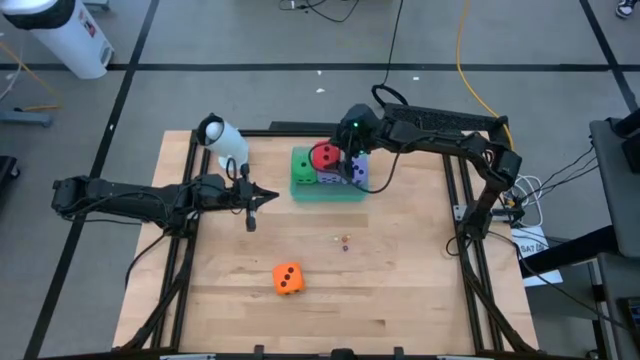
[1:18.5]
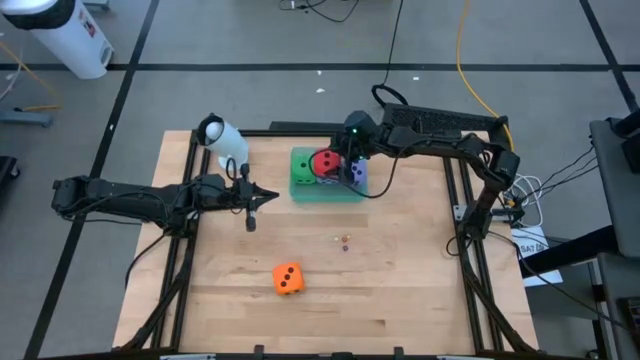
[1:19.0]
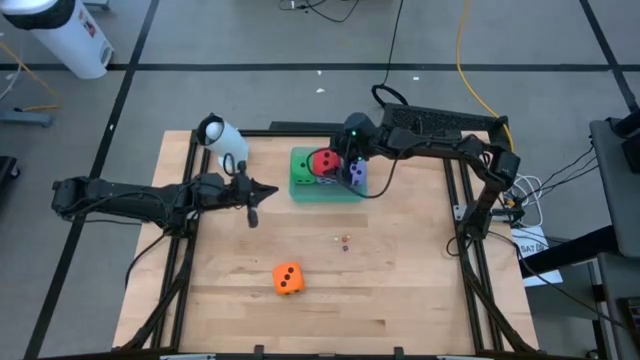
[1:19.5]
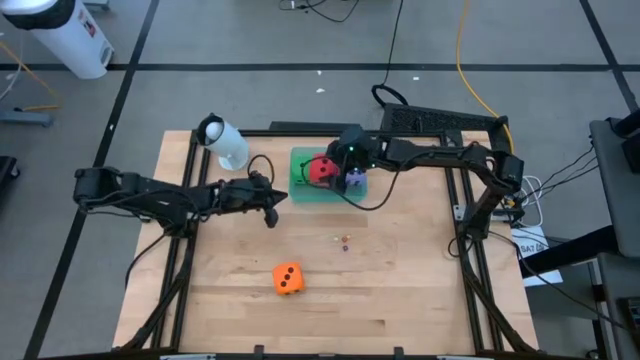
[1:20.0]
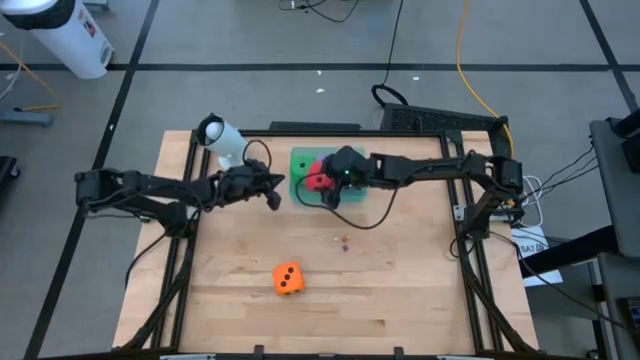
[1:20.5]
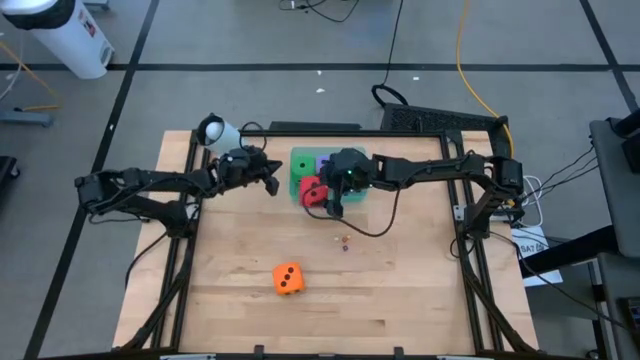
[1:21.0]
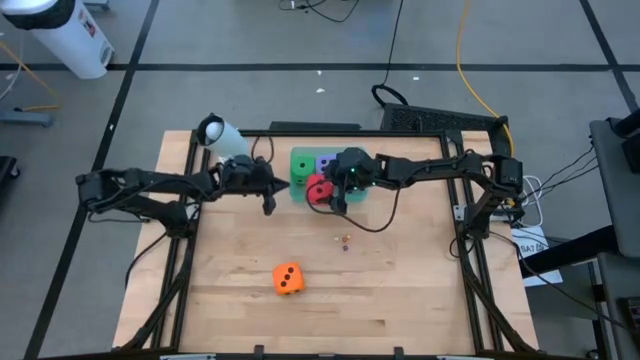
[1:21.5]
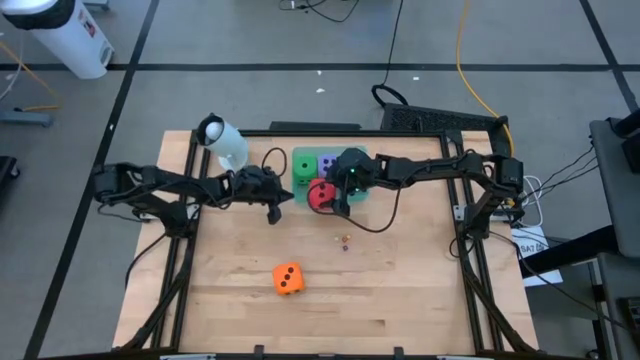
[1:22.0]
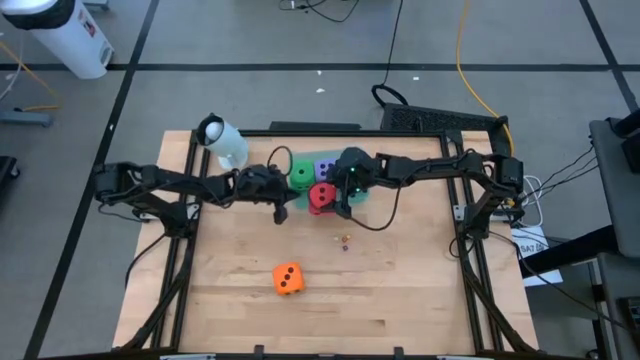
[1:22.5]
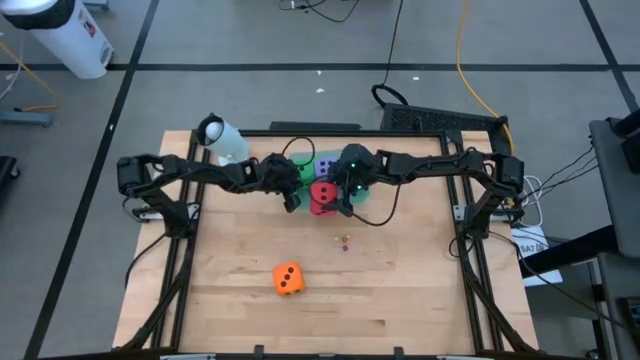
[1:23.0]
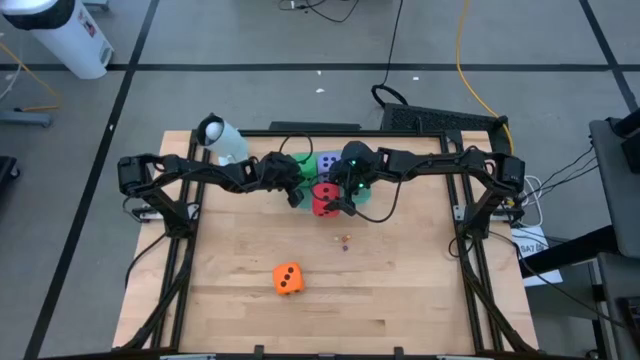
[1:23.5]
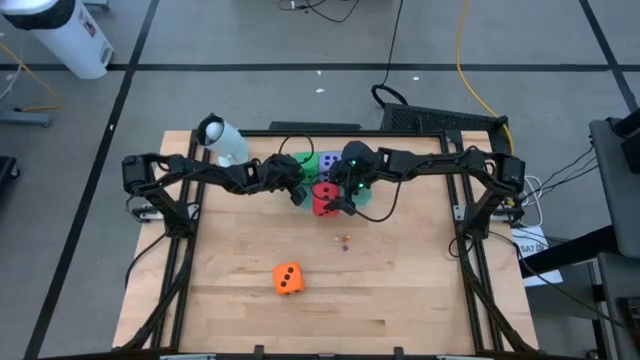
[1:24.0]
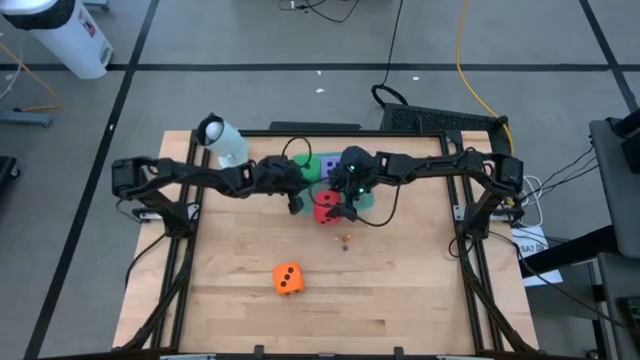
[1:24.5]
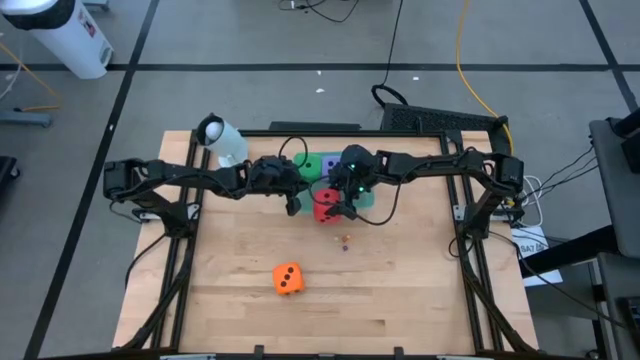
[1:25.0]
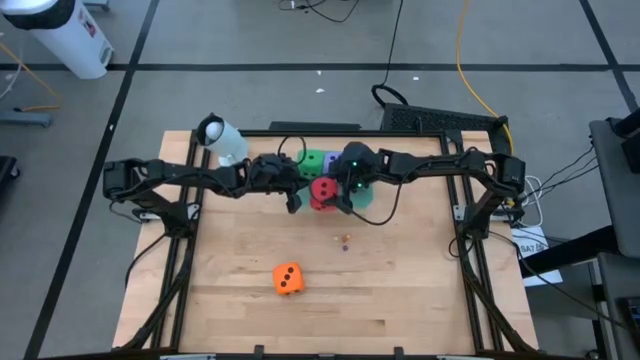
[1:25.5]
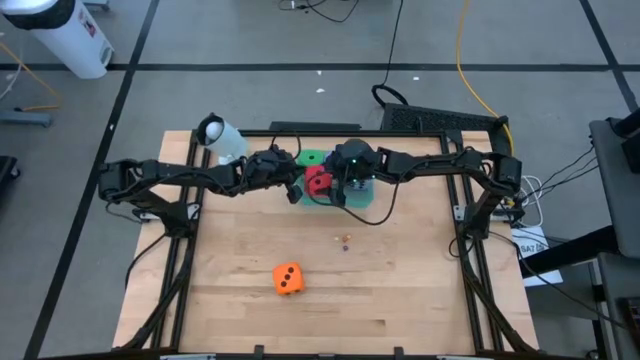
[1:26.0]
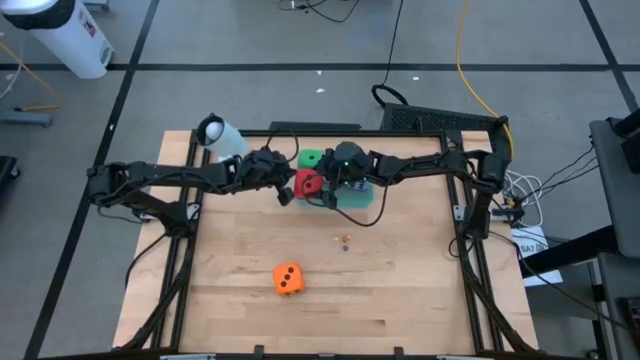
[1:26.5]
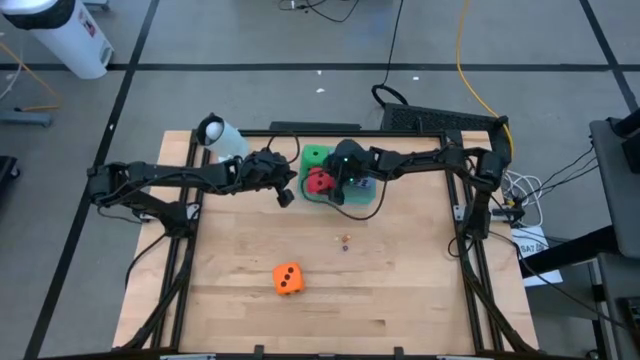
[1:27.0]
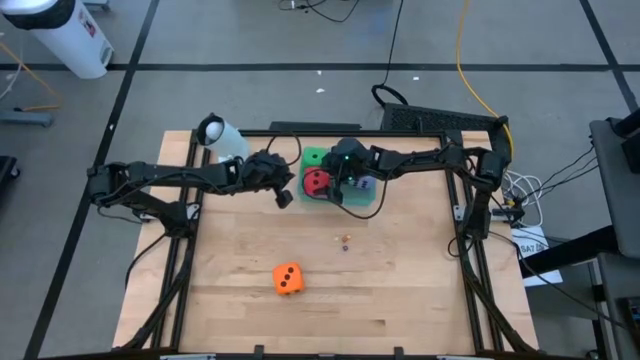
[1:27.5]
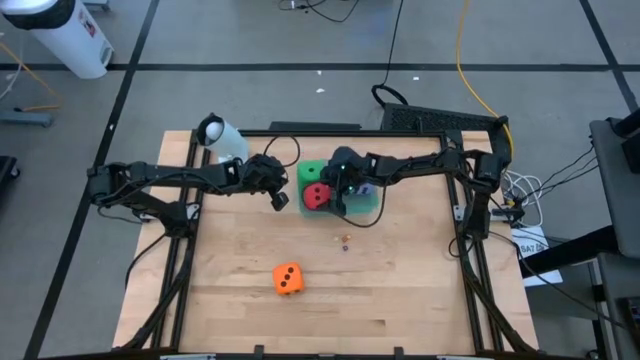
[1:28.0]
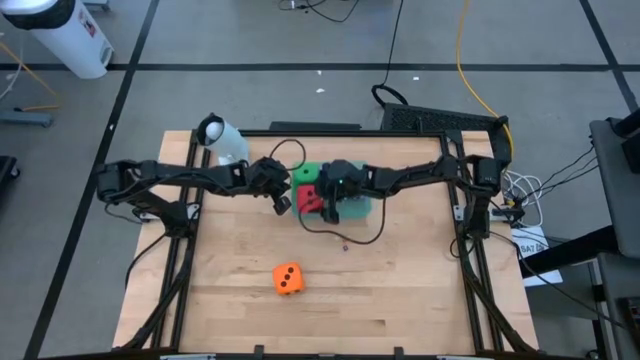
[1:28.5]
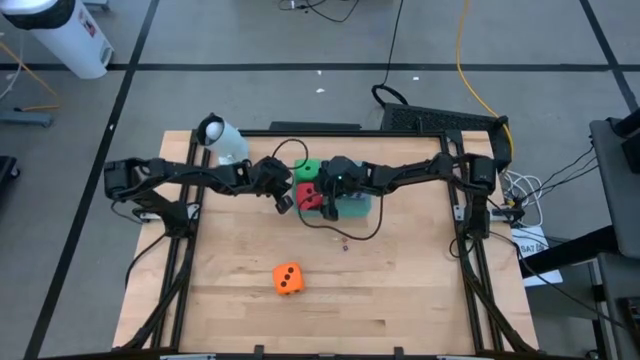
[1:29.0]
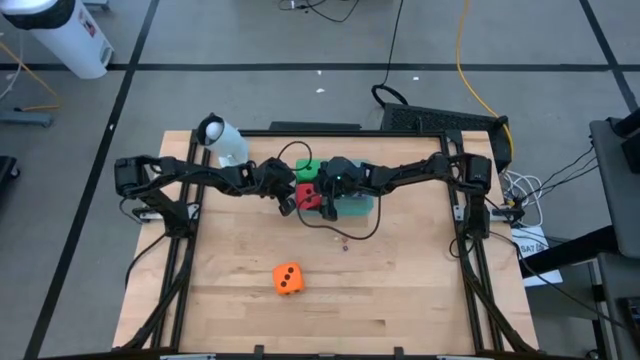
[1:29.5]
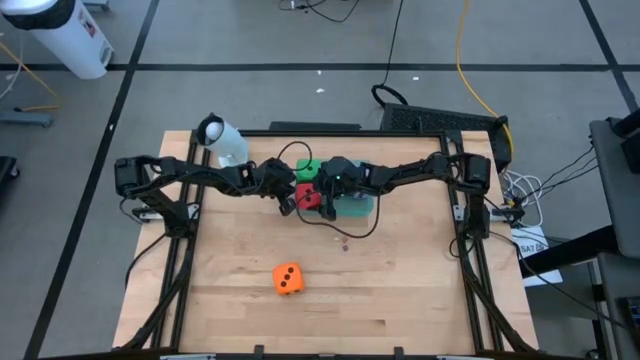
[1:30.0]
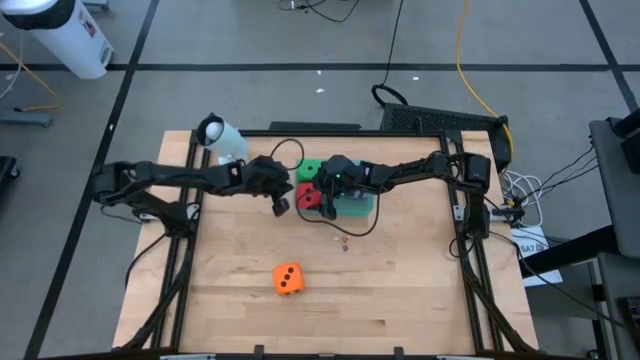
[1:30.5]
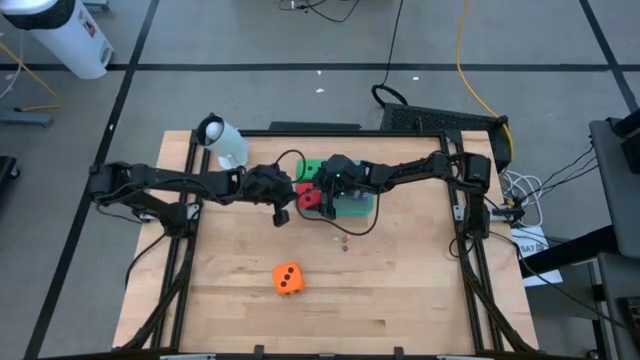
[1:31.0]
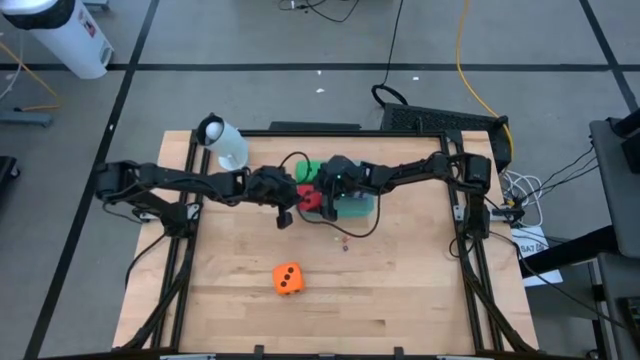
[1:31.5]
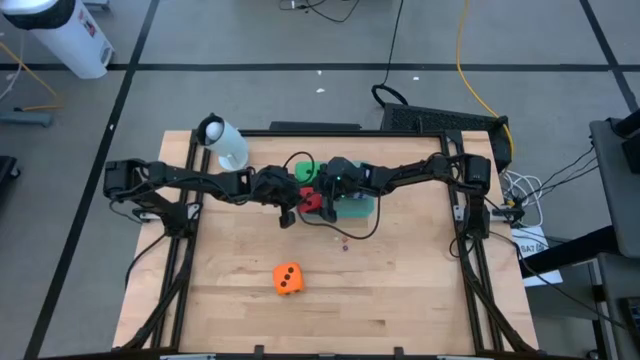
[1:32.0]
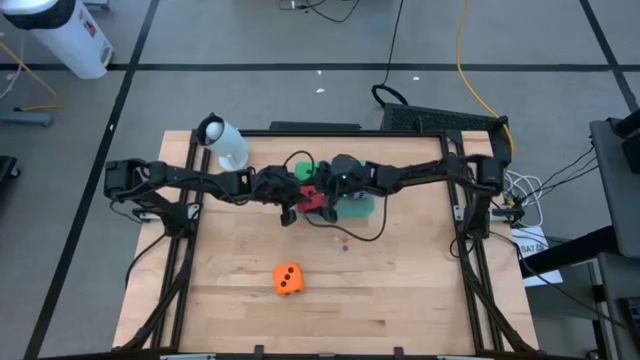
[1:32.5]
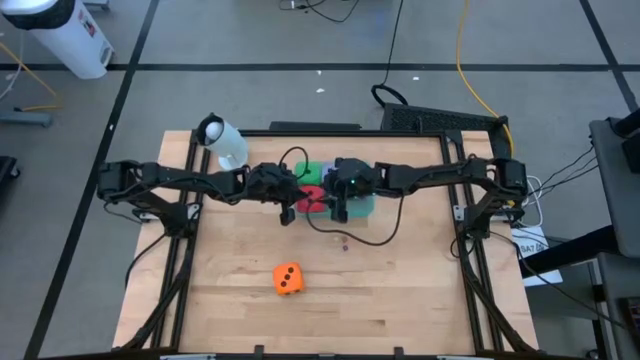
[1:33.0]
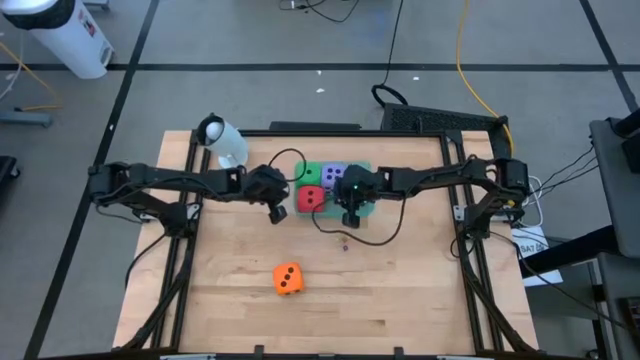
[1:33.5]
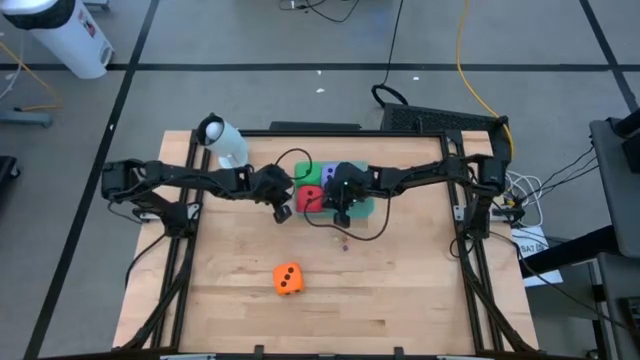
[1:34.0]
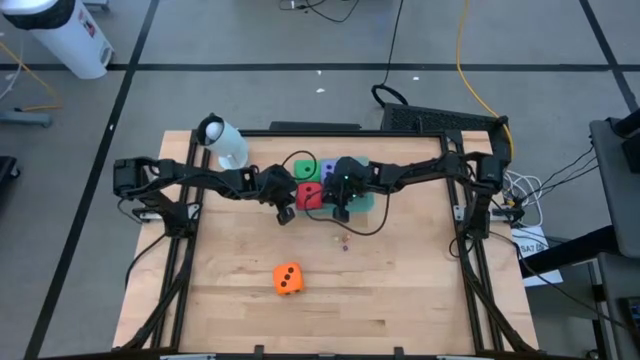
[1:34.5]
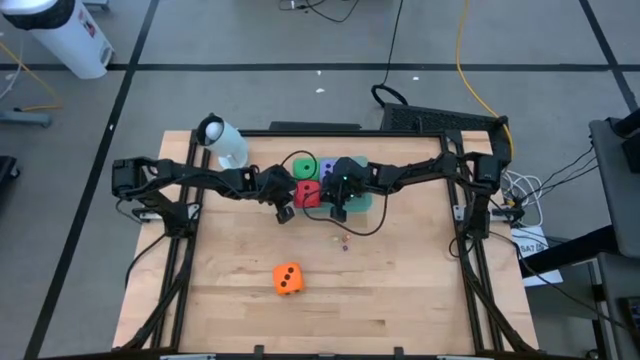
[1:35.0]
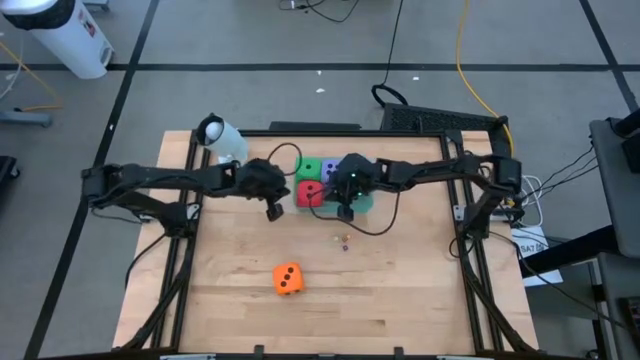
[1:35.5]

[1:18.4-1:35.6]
Task: Pick & Place Dice
Put the large red dice into the blue bin

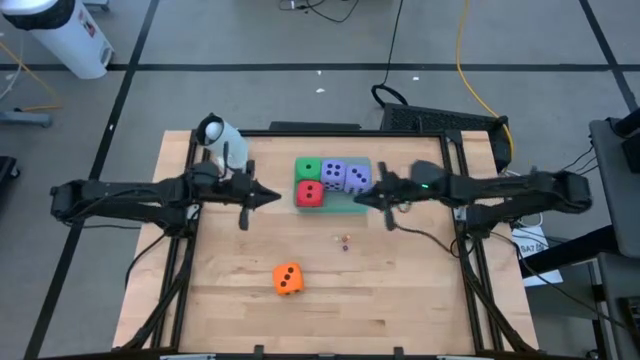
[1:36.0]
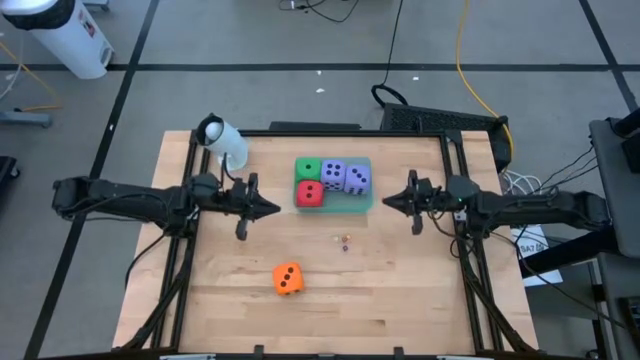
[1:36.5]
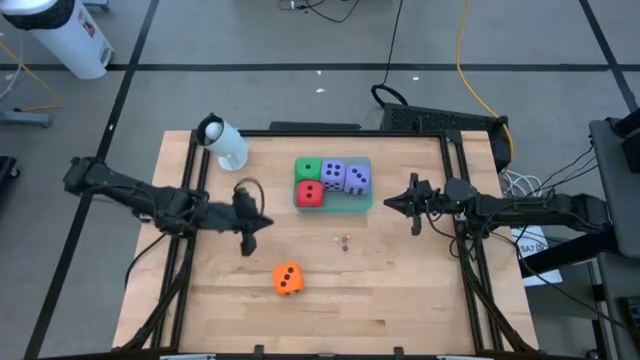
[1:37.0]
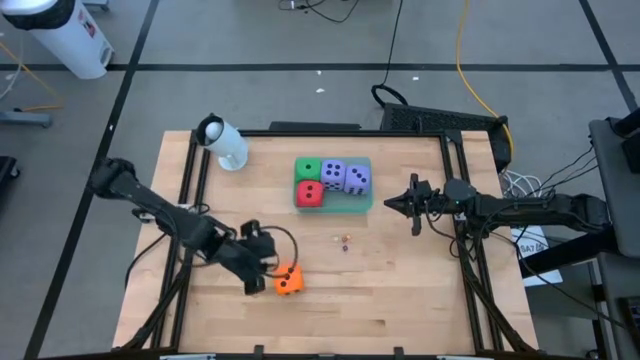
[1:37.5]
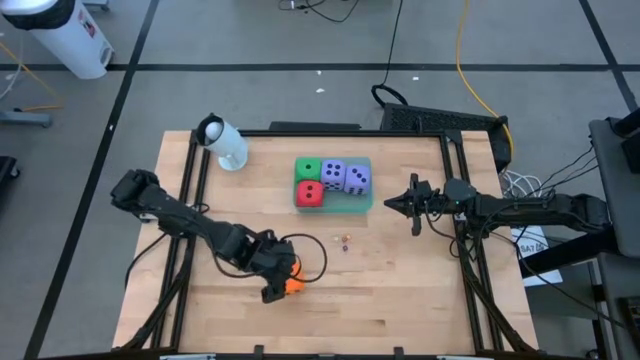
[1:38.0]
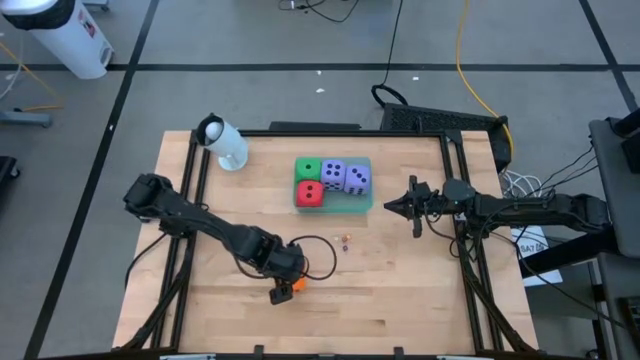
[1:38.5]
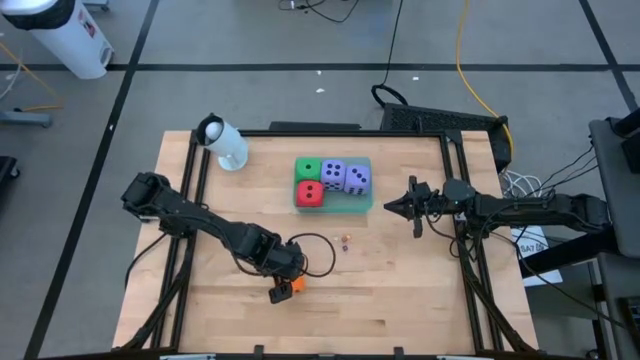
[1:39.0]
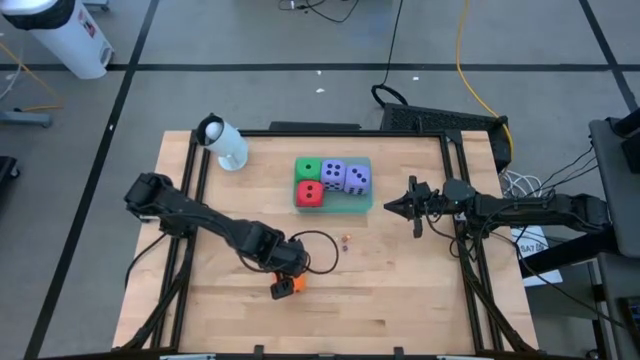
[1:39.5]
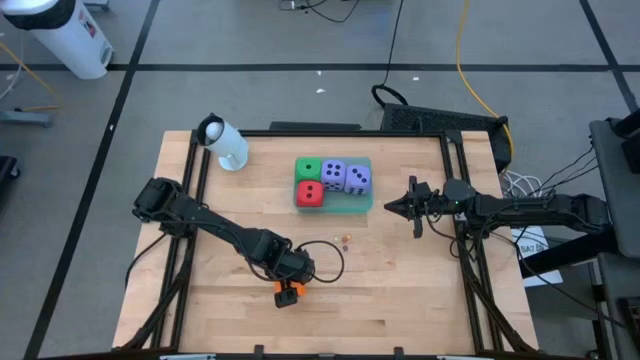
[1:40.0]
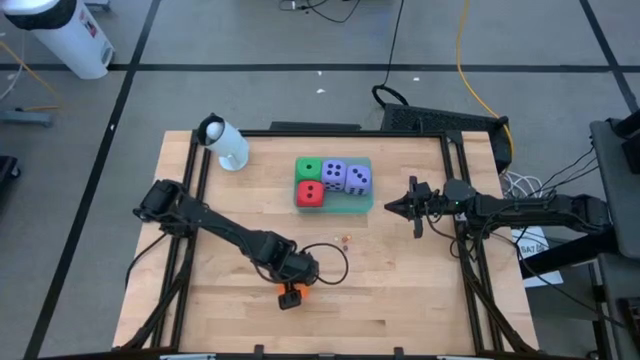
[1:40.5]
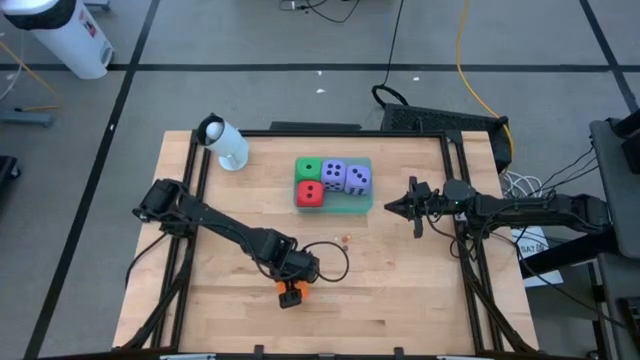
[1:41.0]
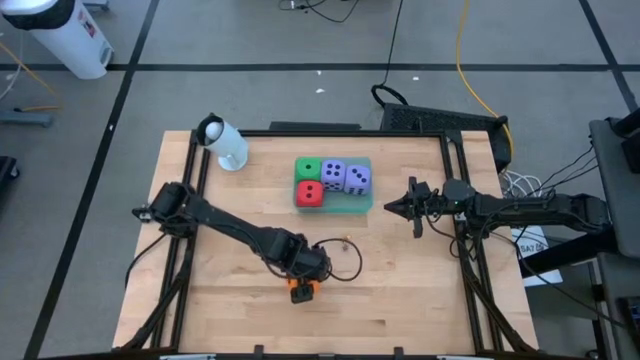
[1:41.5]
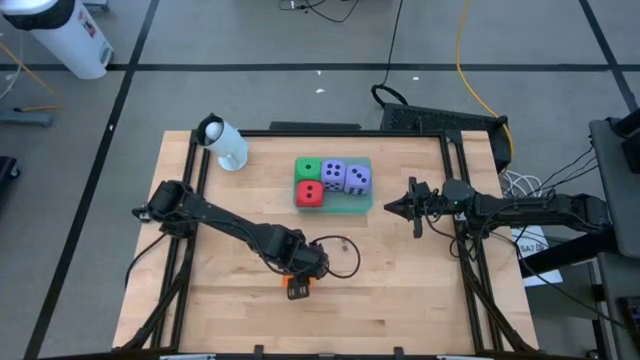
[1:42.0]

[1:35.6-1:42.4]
Put the large orange dice into the blue bin
